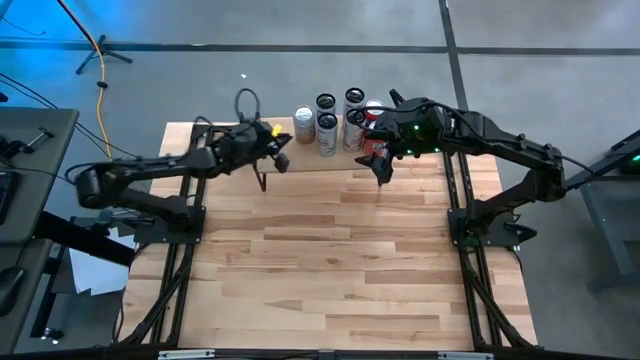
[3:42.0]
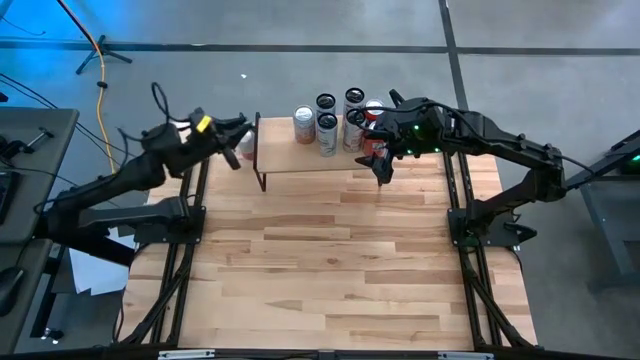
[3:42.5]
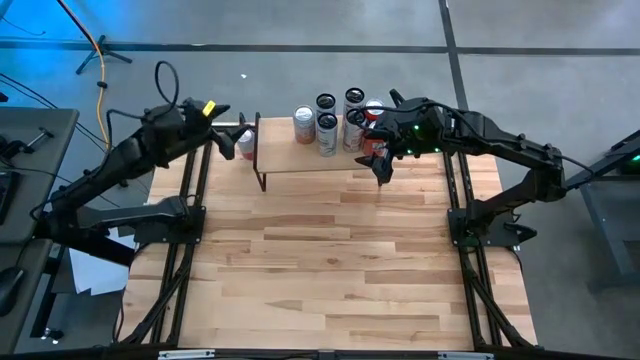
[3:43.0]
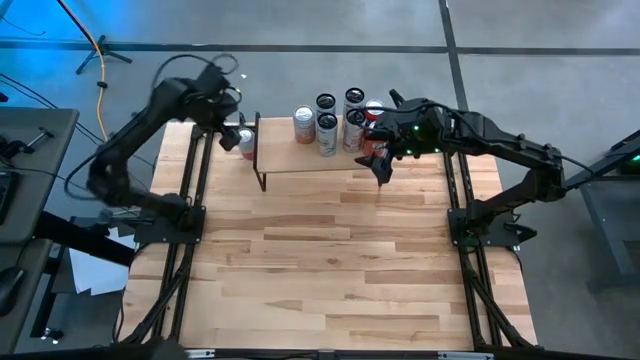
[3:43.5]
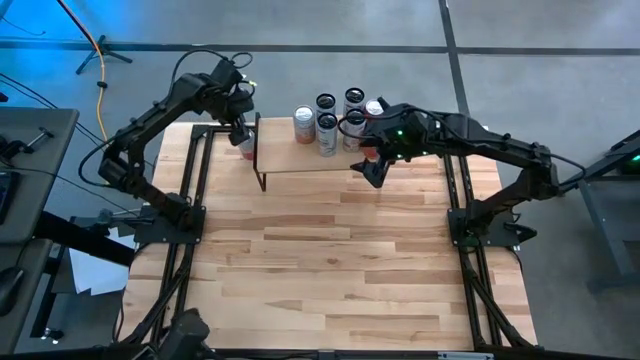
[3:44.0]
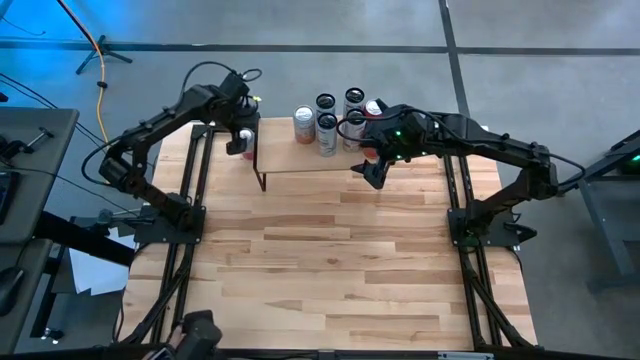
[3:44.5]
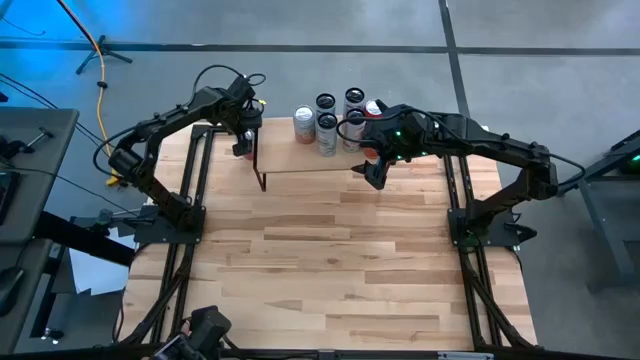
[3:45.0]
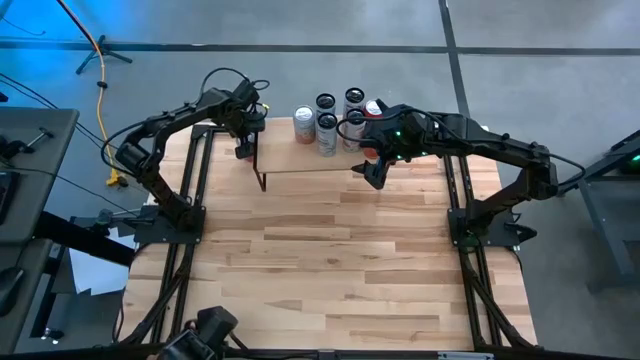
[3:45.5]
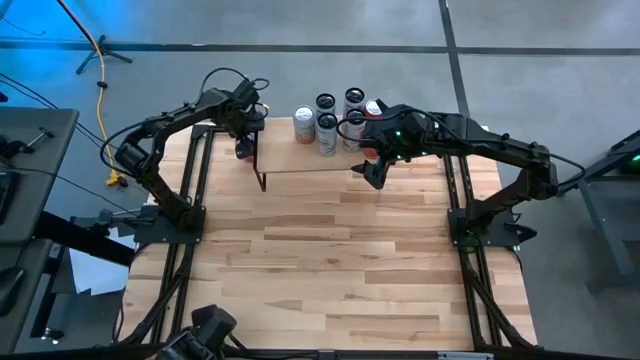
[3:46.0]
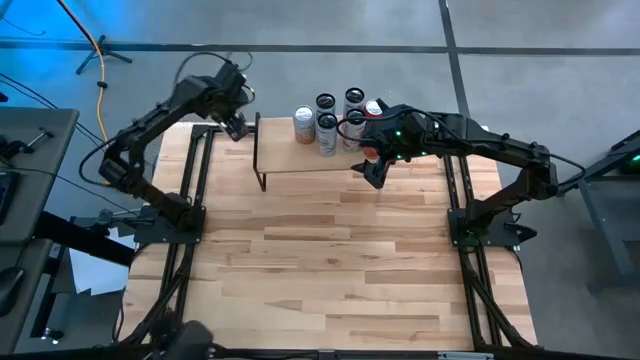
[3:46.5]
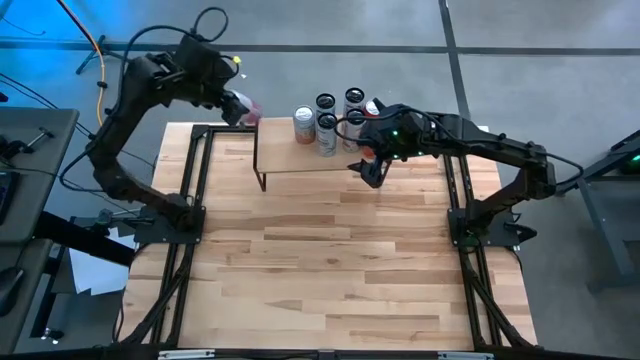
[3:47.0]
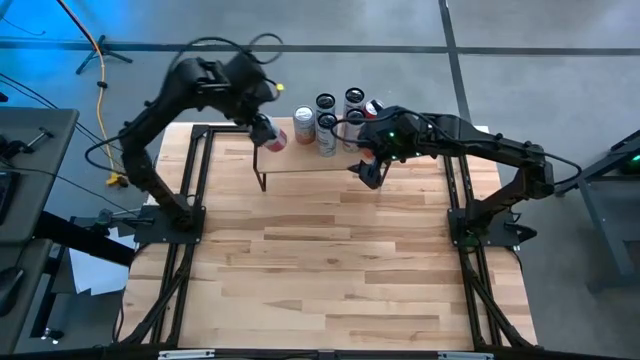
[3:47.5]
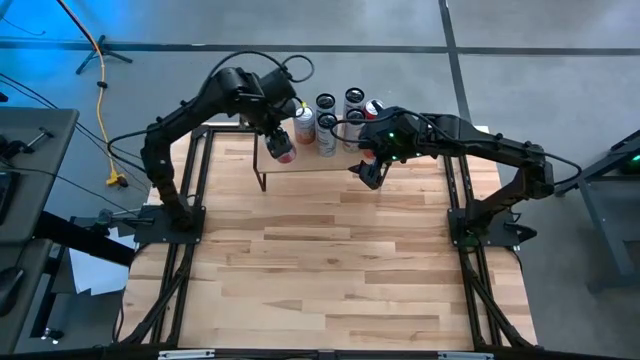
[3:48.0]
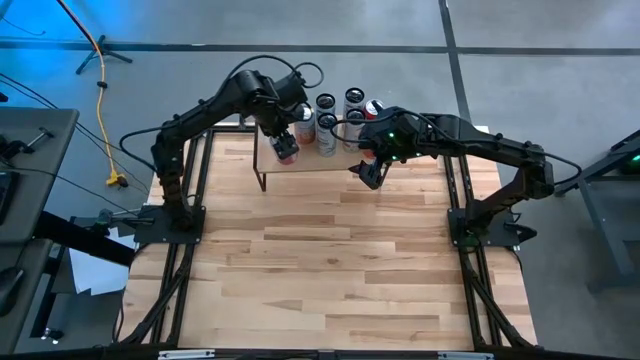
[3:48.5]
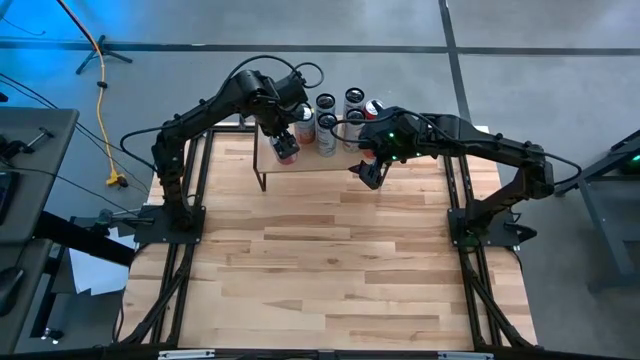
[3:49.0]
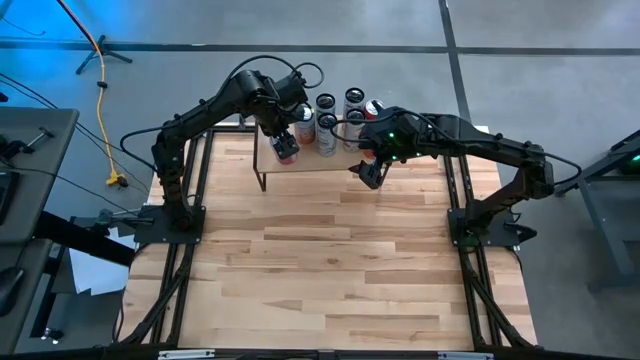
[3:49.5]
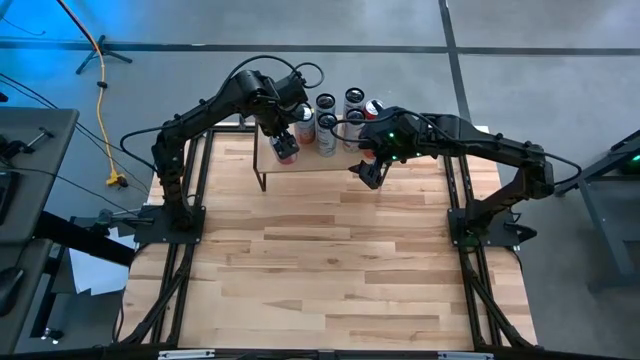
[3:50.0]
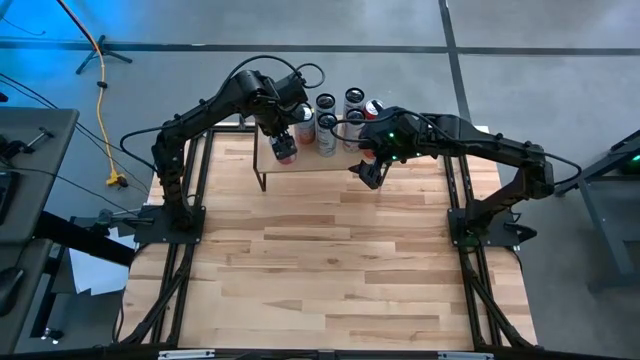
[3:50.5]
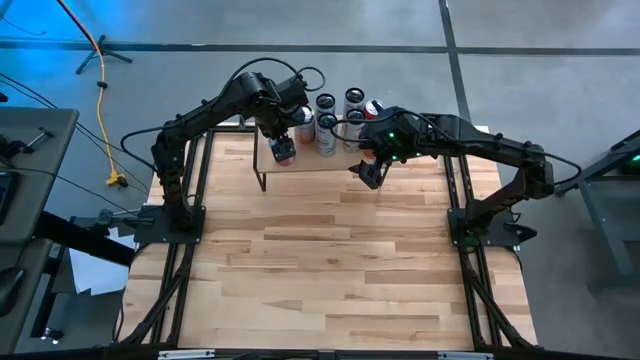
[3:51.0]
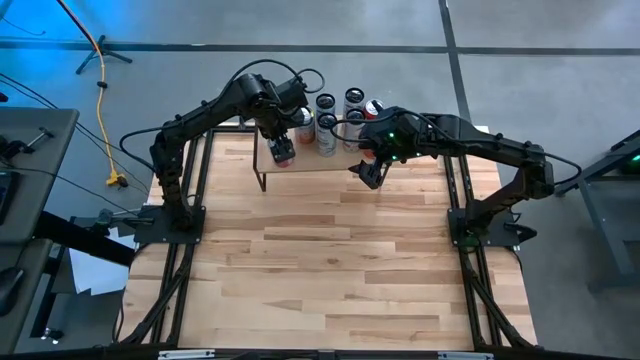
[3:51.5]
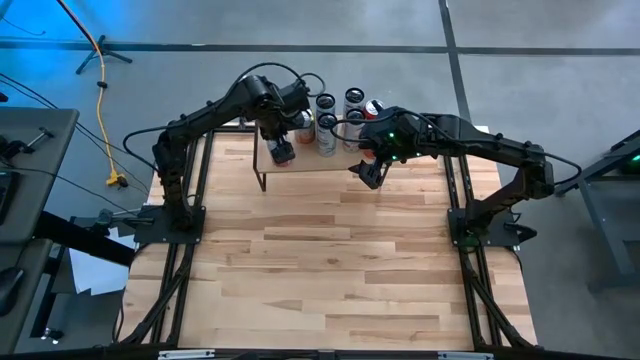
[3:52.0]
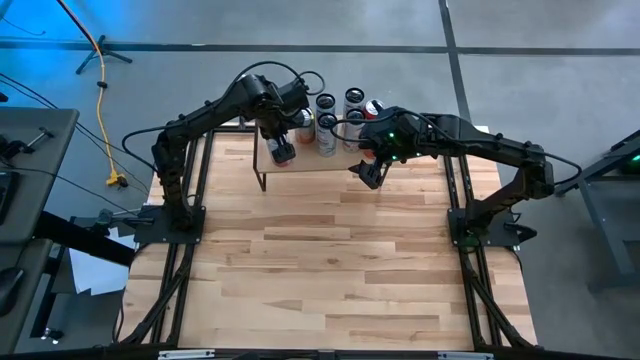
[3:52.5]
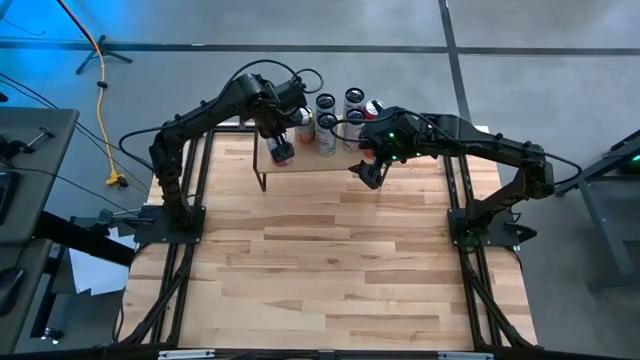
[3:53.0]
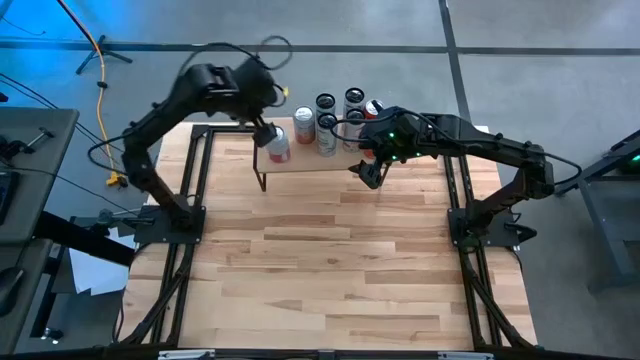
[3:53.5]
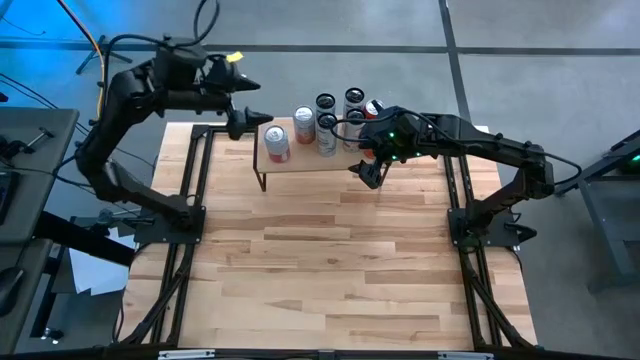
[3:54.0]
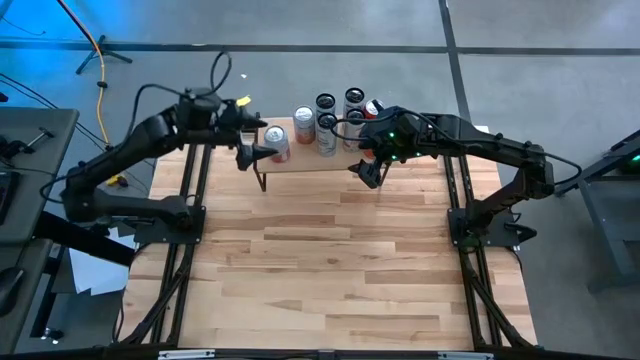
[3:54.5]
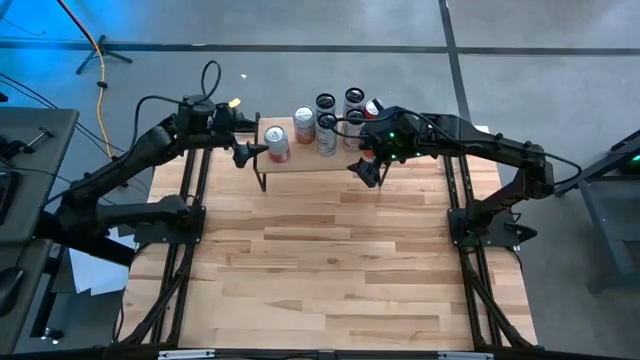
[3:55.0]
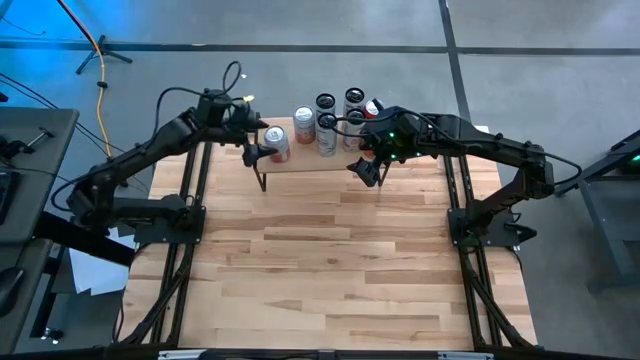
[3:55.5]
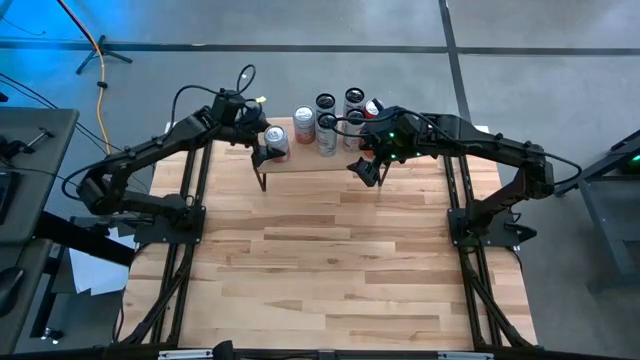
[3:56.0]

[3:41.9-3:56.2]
Task: Place canned beverage on shelf
Put the silver soda can on the shelf

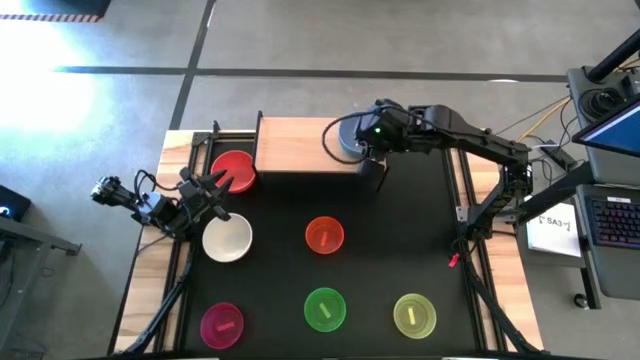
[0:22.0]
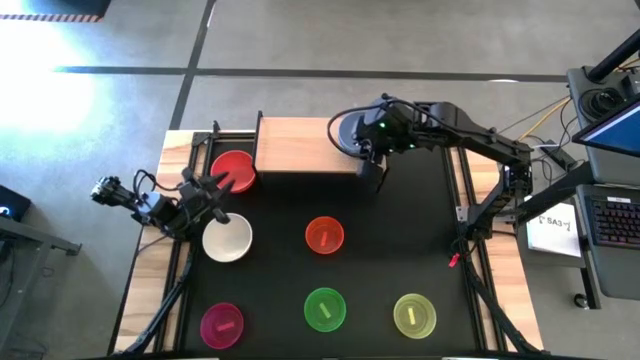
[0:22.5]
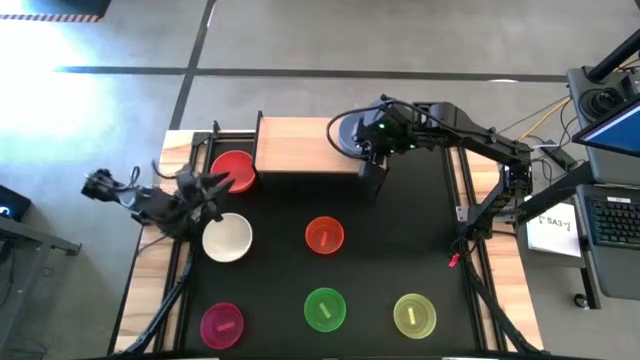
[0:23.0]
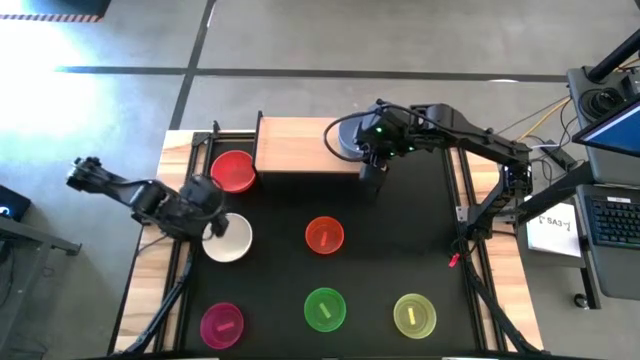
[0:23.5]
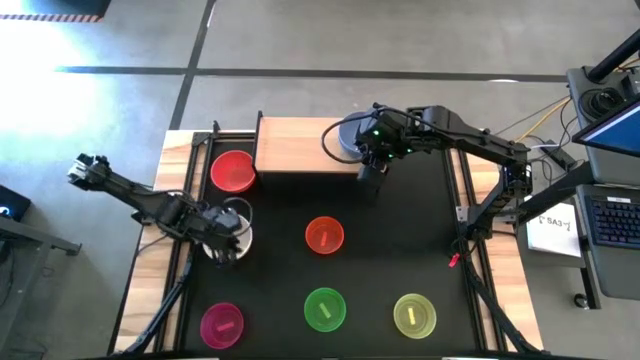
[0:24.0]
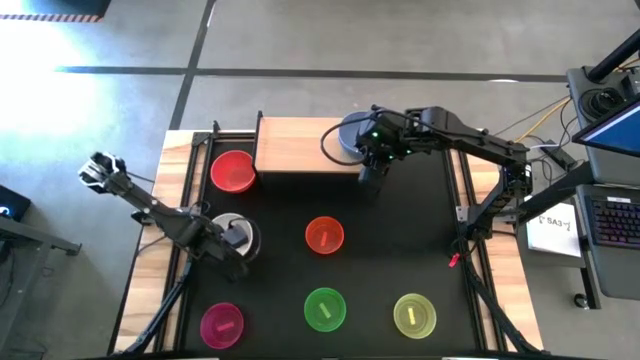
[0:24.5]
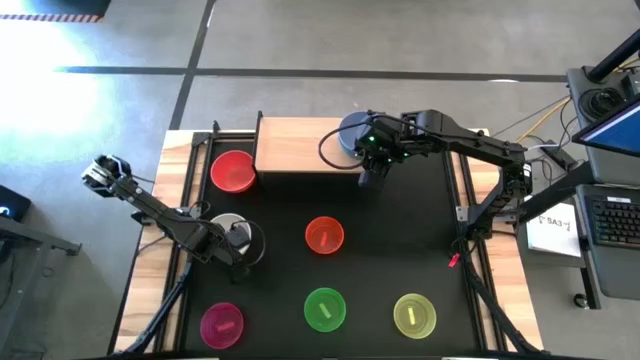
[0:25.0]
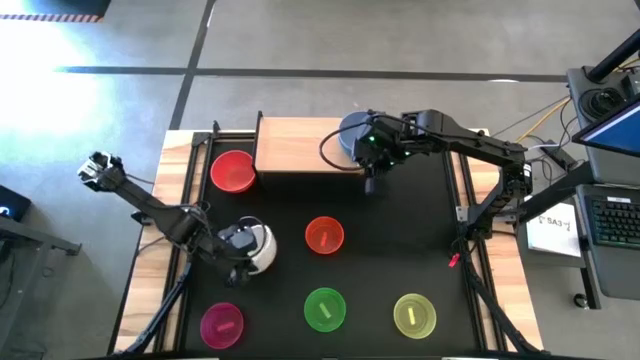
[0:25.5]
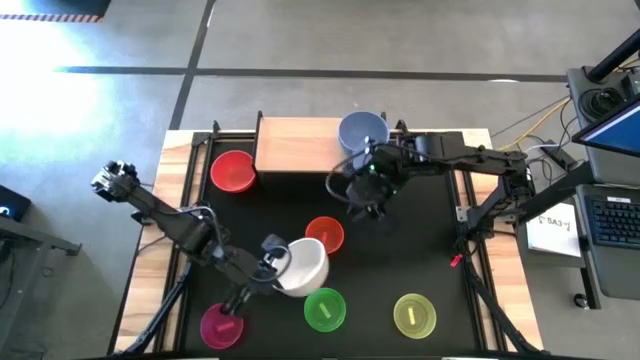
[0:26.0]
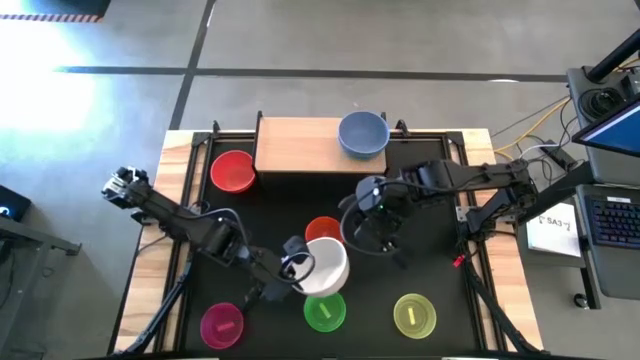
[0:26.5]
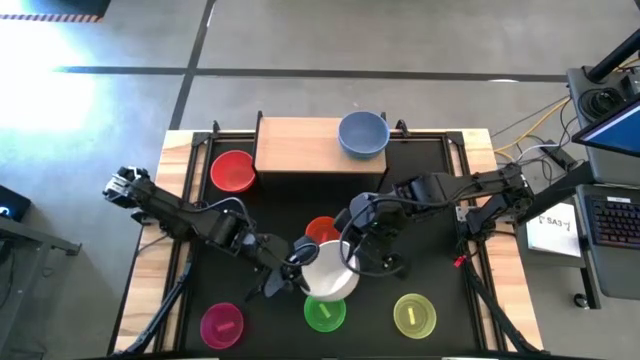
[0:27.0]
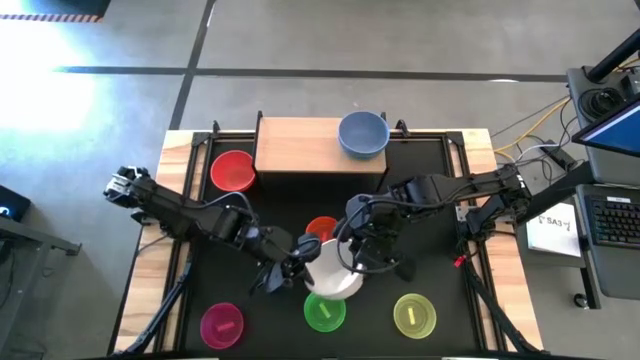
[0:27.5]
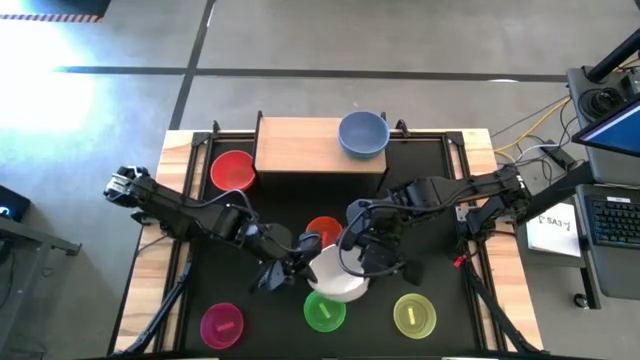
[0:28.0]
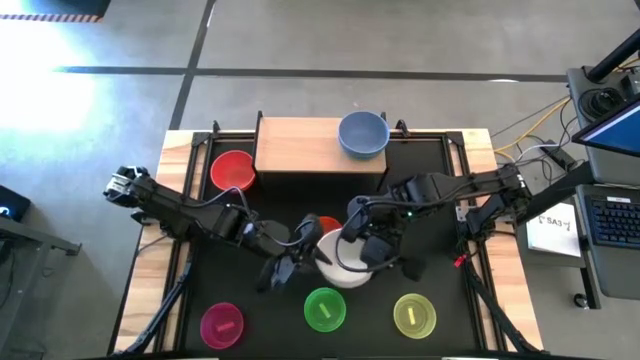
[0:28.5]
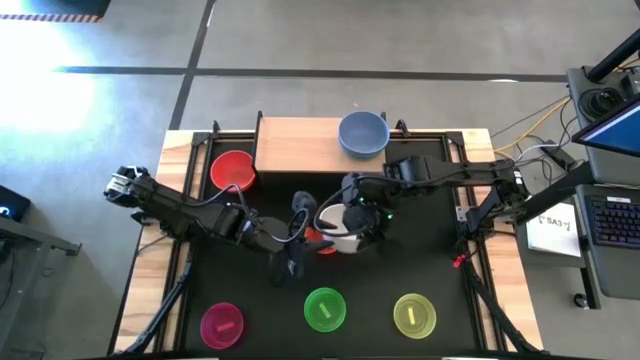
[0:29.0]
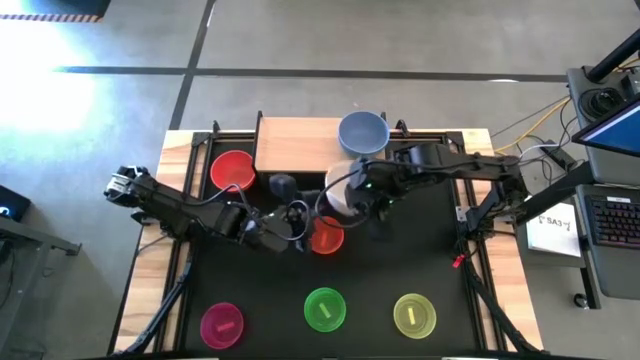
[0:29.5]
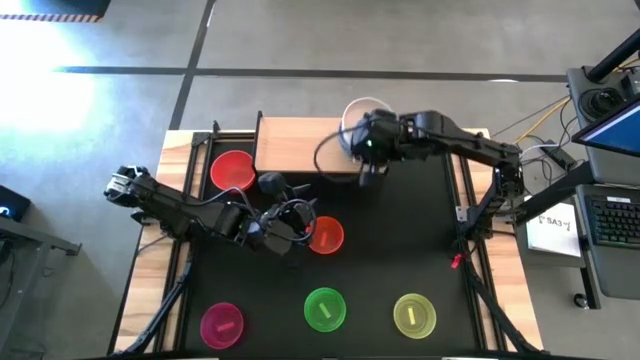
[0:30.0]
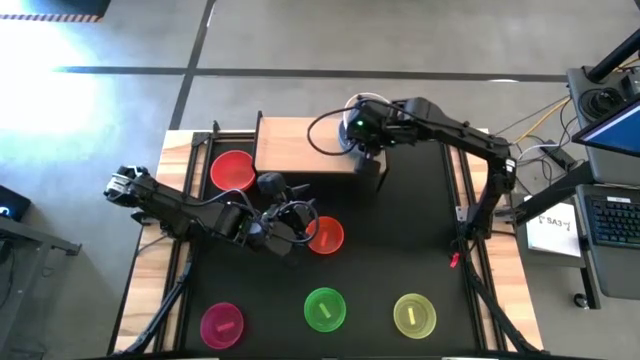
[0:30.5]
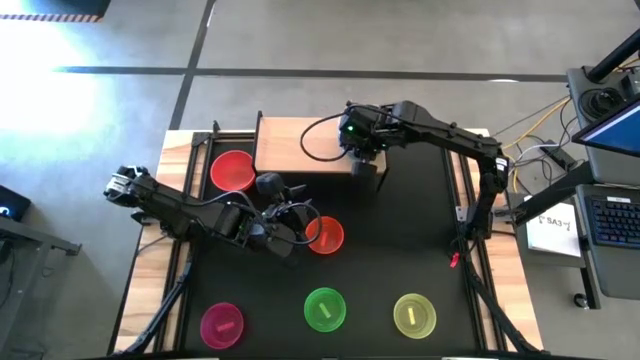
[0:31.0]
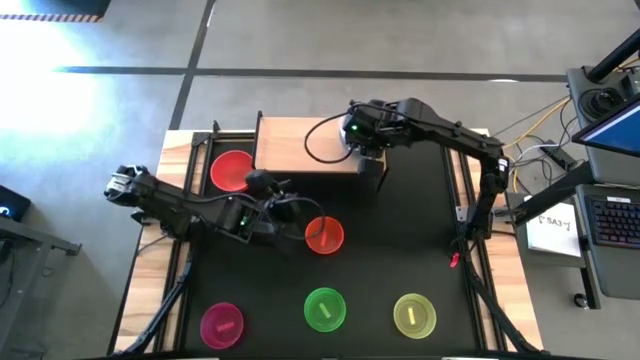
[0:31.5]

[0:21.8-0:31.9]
Task: Place and stack bowls onto a shelf
Stack the white bowl on top of the blue bowl on the shelf
